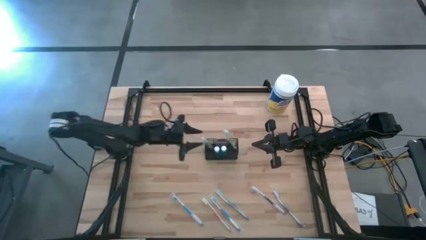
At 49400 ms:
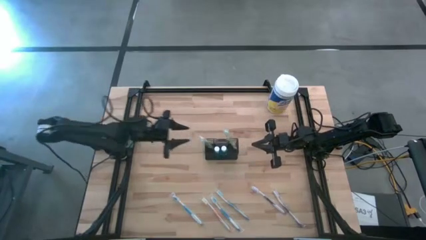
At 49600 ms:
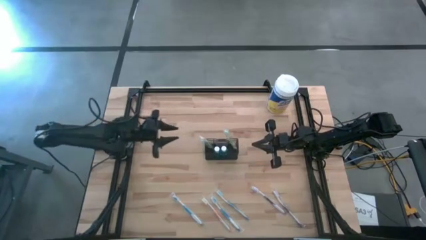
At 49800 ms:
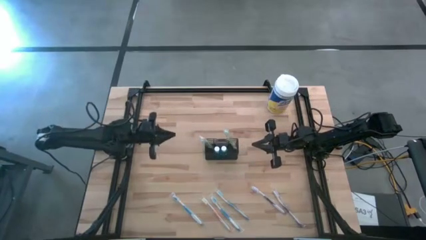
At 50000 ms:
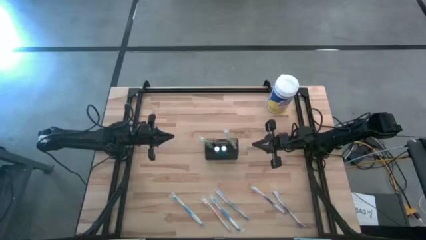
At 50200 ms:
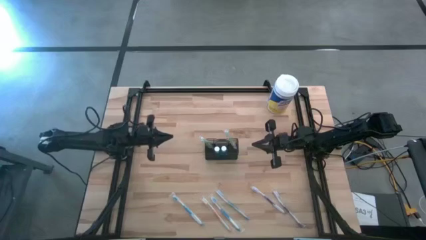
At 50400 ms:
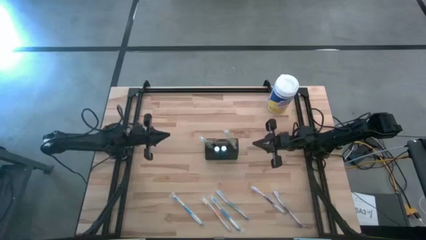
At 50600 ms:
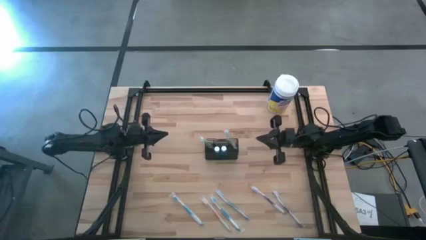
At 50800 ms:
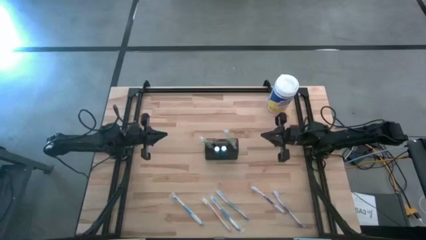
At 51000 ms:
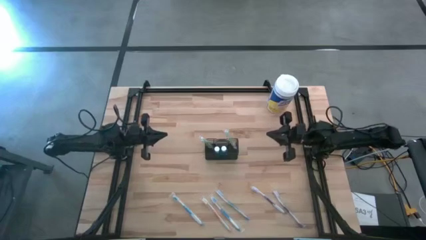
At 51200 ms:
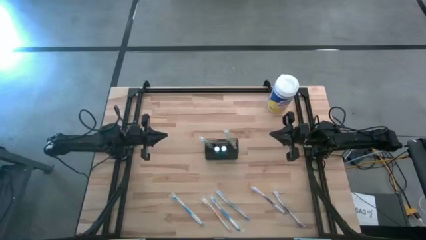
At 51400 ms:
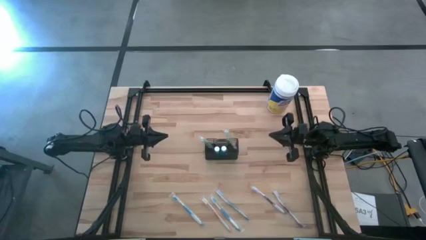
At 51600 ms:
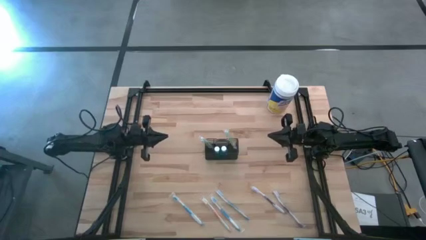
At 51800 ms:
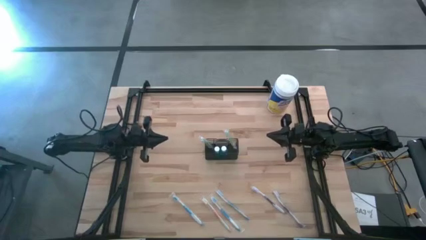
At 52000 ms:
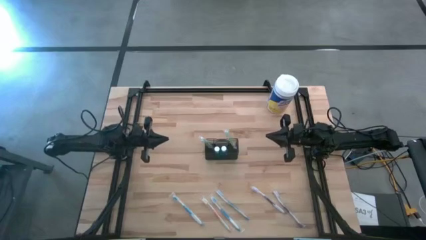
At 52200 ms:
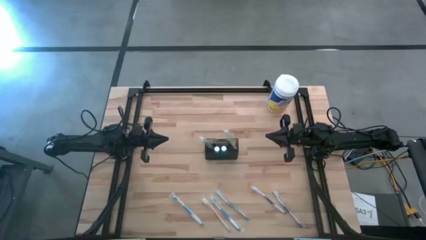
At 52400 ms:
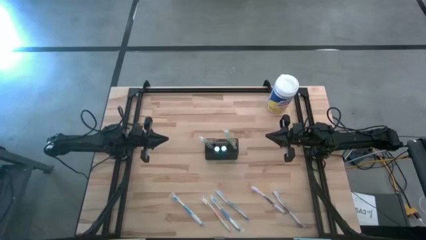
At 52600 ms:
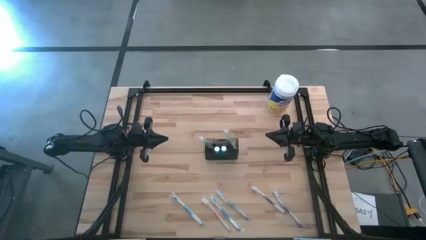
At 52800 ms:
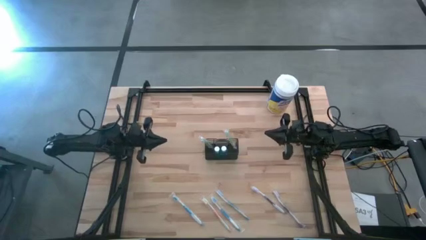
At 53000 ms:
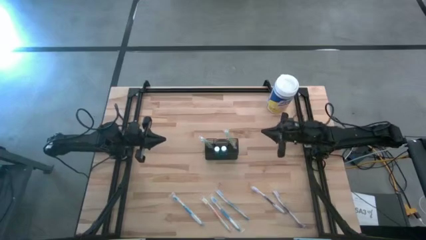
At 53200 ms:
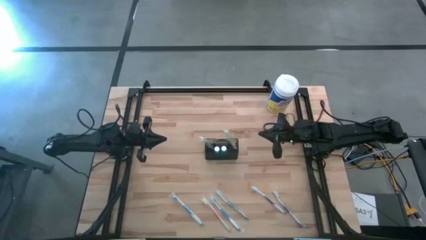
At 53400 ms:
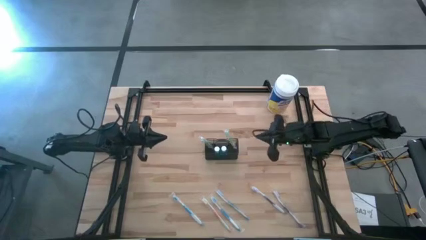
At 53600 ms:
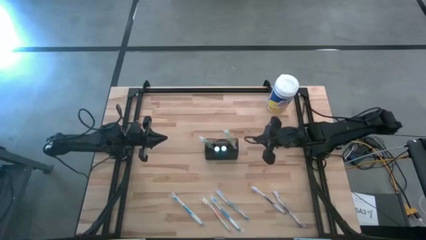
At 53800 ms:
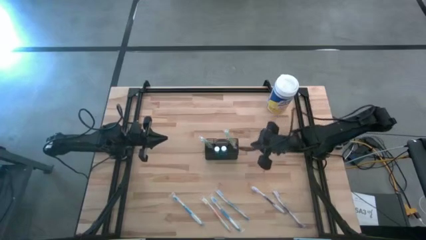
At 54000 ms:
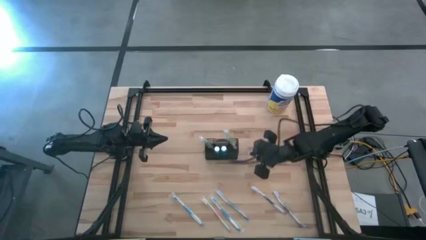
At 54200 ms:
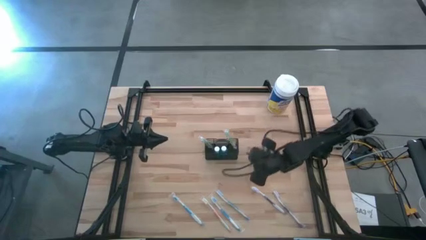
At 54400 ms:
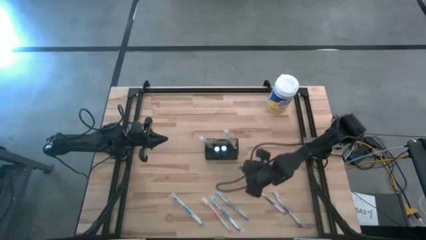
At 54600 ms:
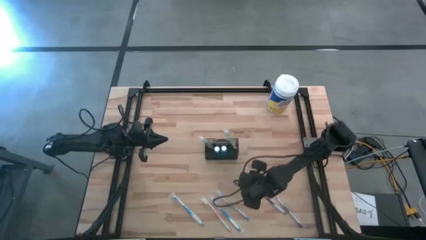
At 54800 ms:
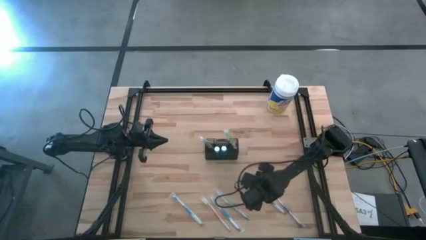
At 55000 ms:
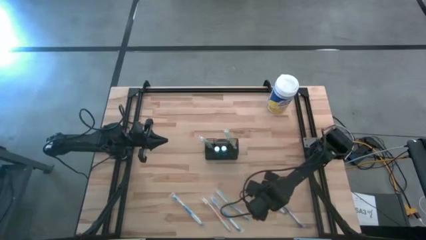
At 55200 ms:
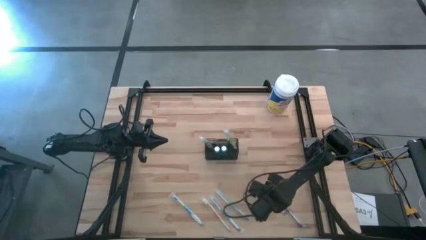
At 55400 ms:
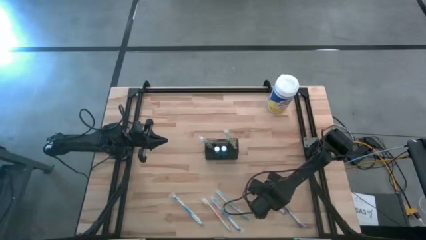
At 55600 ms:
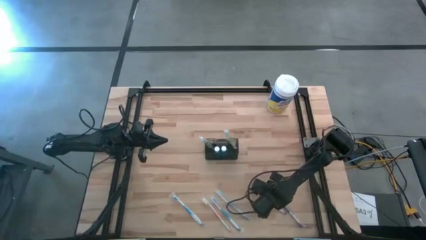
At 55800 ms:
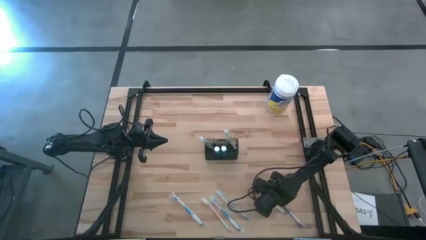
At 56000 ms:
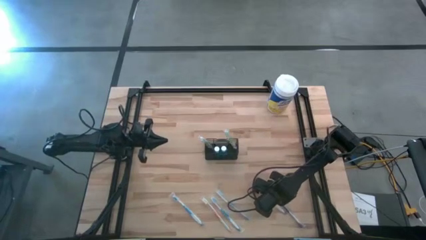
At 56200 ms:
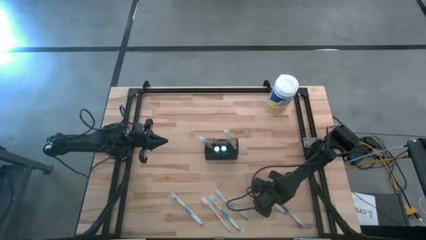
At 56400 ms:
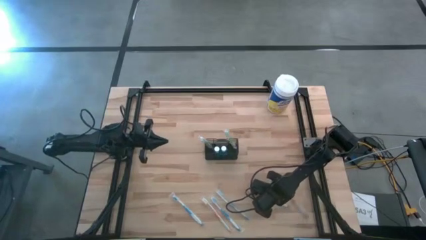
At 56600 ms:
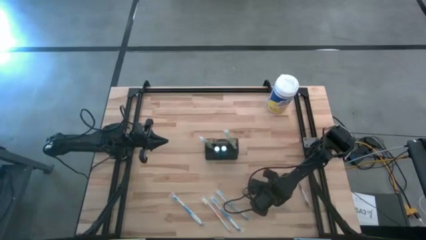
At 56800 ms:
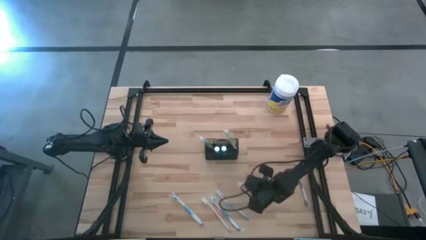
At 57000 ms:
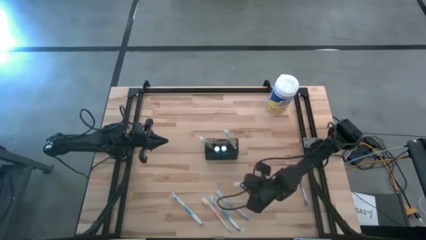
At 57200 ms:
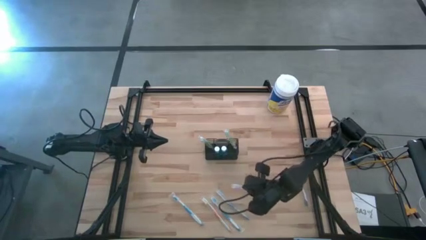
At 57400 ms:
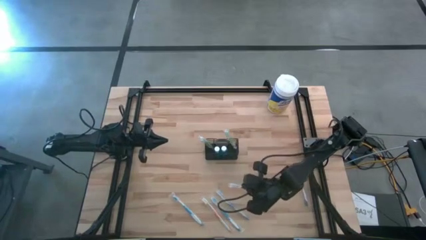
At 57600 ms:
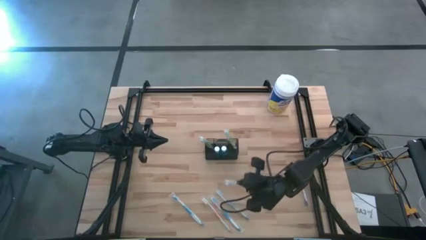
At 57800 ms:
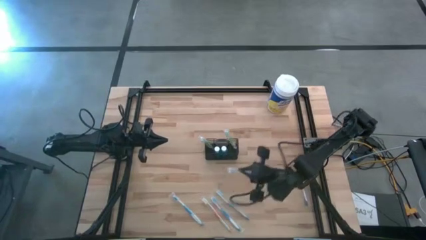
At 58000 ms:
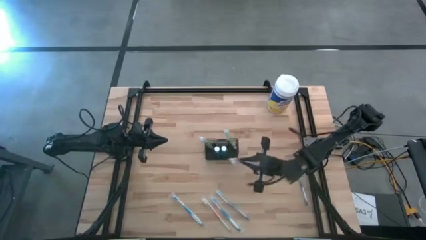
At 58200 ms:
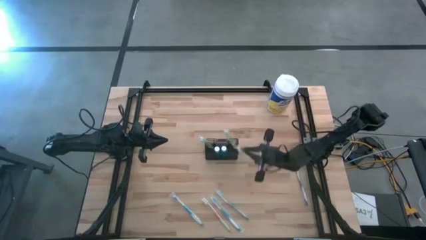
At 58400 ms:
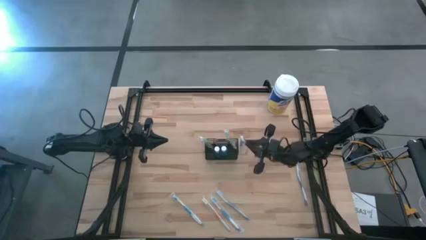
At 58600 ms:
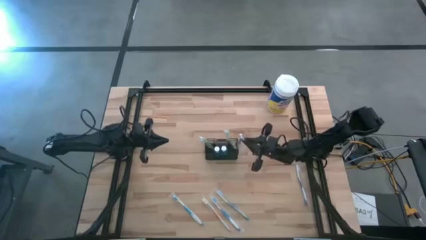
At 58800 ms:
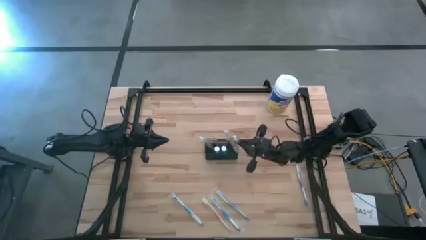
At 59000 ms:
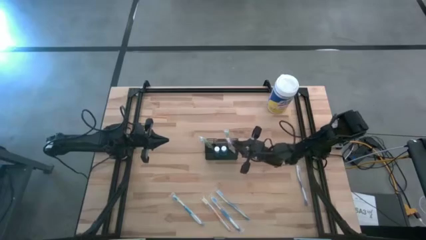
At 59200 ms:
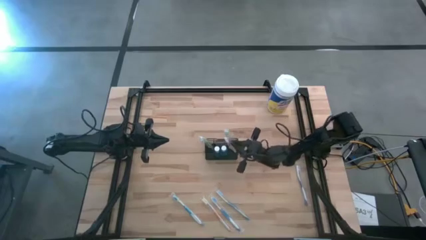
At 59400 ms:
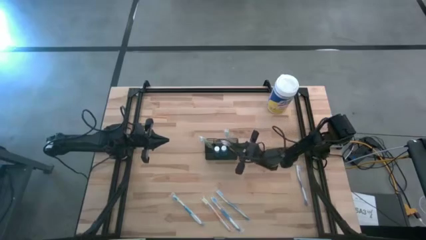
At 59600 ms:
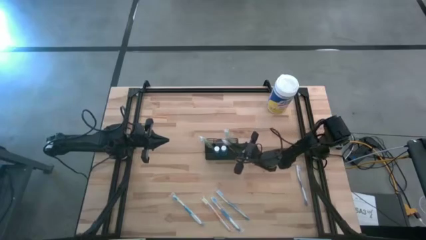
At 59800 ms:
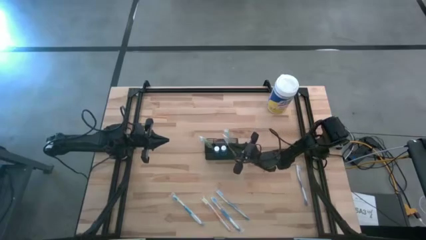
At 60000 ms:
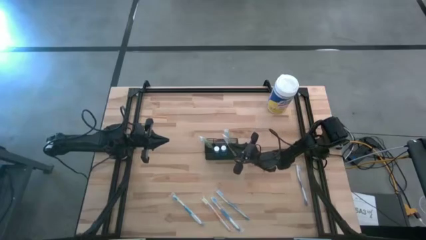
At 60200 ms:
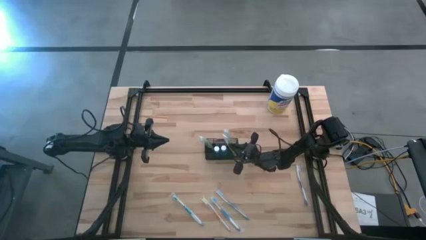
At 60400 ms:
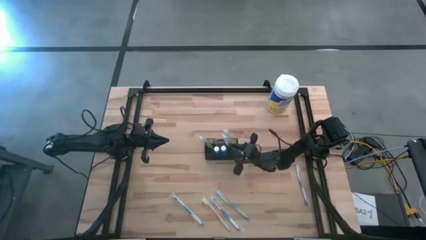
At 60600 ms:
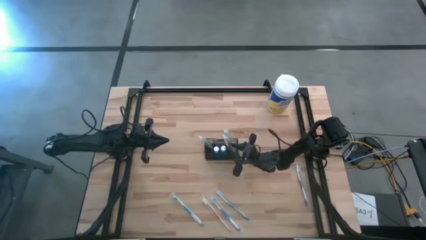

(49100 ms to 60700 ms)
Task: Pick & Place toothbrushing station
Put the purple toothbrush into the black organizer

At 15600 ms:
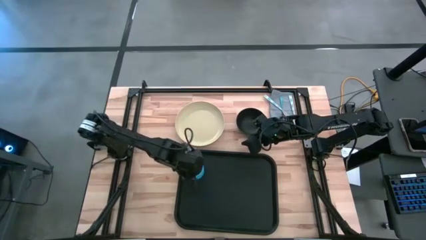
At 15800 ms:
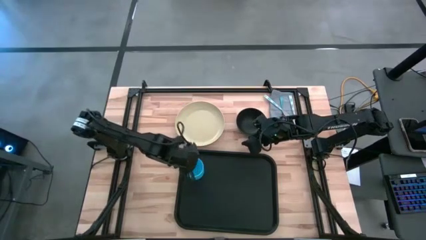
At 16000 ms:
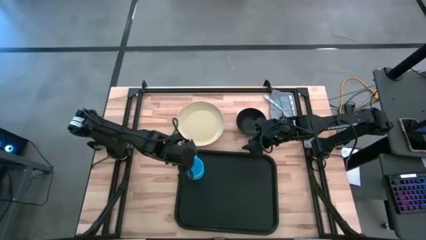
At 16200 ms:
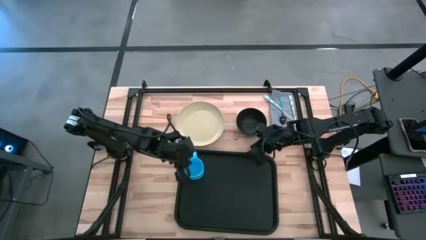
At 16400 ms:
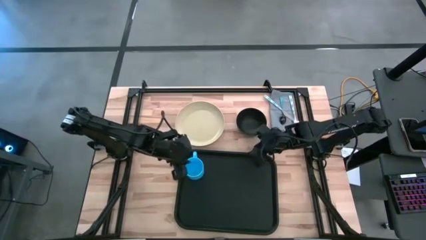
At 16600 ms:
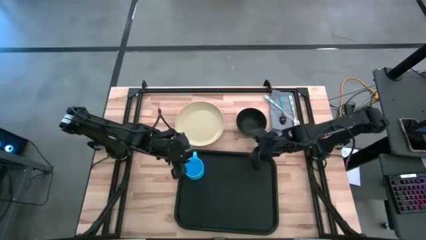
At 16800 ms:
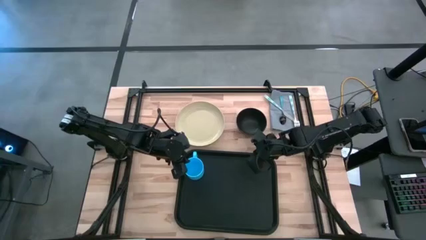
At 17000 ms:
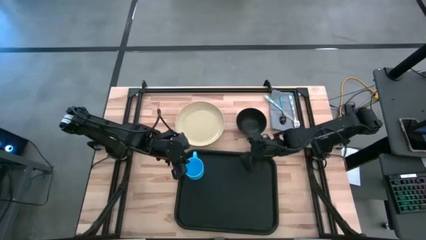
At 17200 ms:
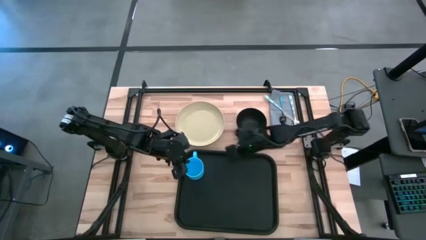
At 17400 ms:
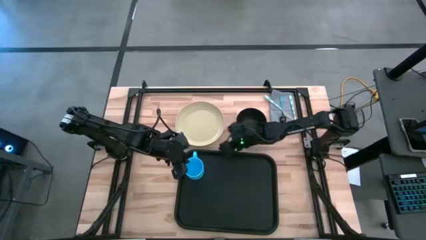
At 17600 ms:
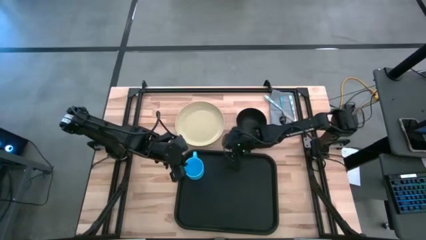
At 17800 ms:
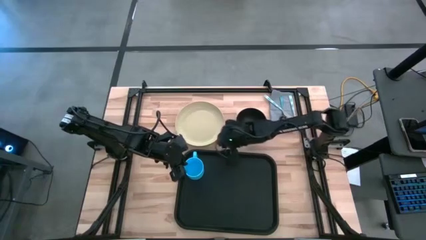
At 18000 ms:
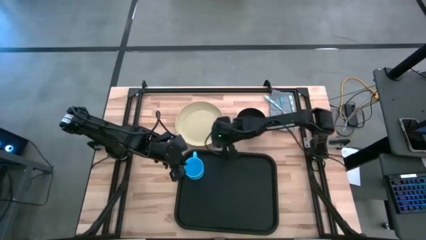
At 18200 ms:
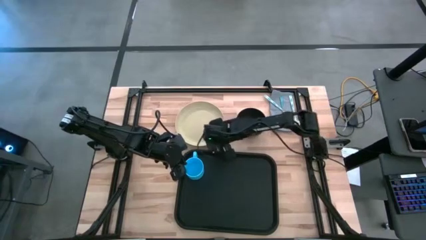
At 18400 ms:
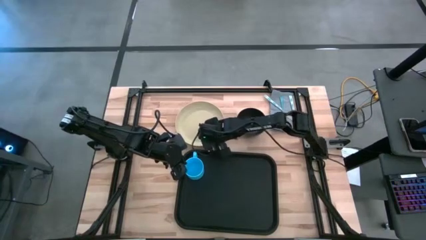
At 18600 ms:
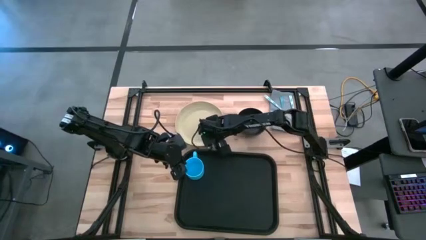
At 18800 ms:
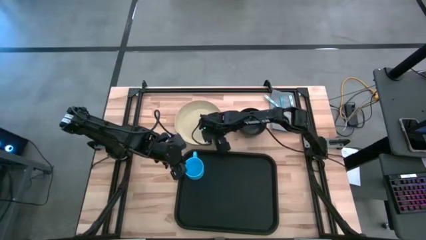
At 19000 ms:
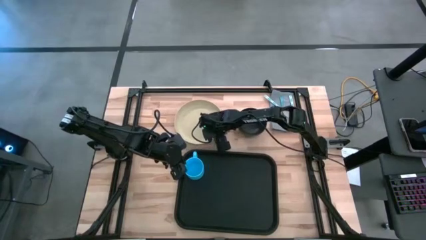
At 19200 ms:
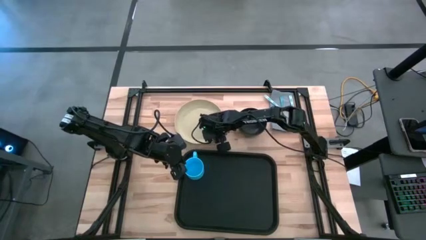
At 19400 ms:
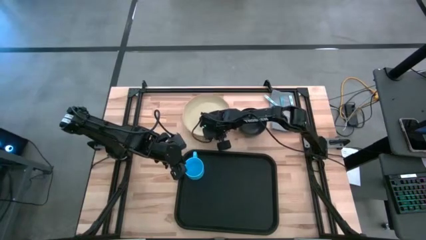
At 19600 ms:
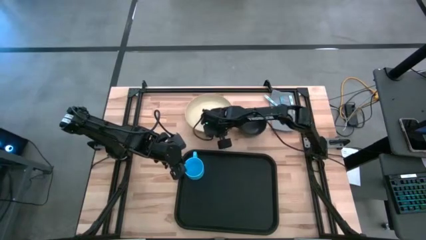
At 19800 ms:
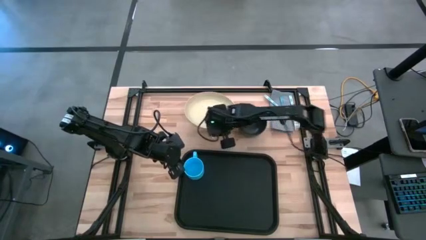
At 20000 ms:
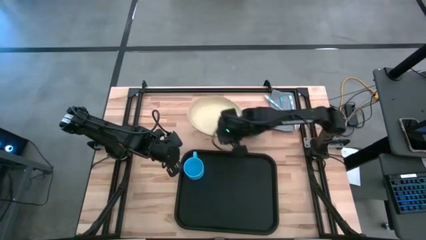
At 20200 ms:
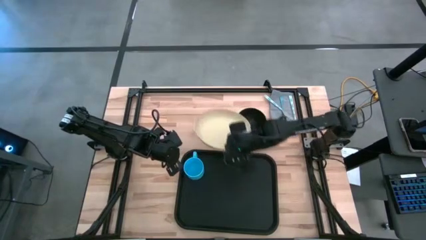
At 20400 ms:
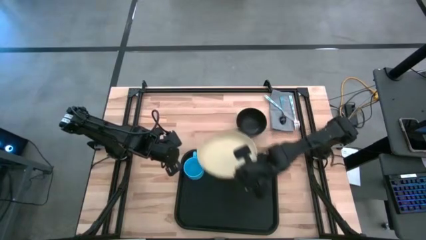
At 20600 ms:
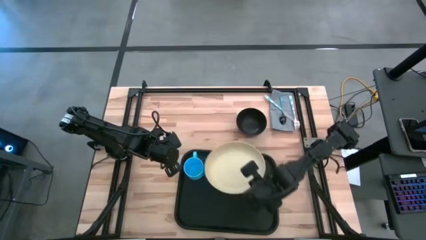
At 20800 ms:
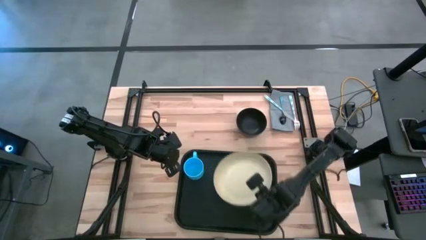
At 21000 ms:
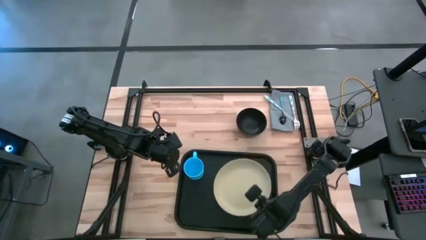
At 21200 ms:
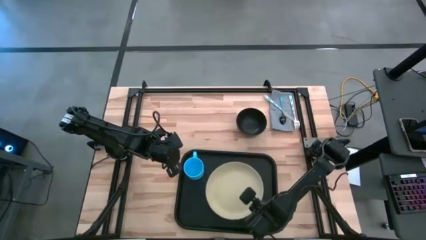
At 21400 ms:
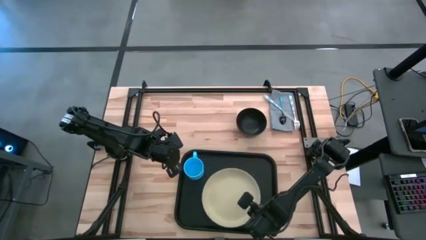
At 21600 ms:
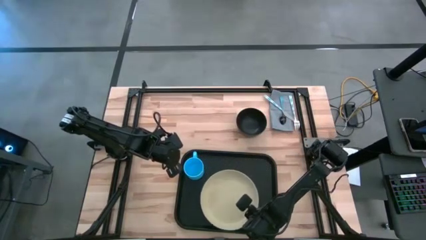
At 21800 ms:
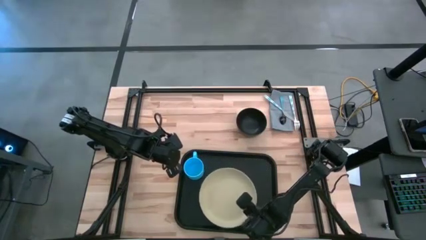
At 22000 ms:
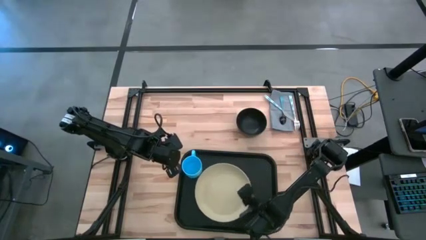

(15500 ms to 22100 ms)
Task: Set up tray
Put the brown plate to the bottom right of the blue mug on the black serving tray
